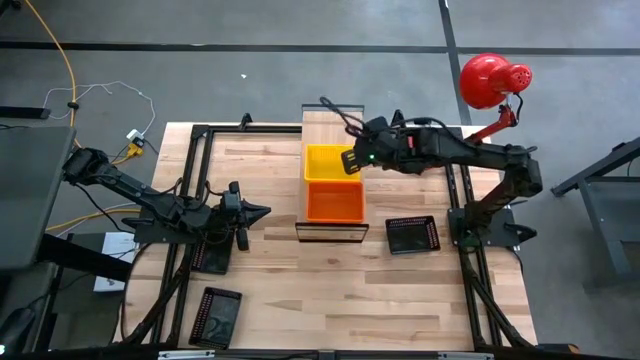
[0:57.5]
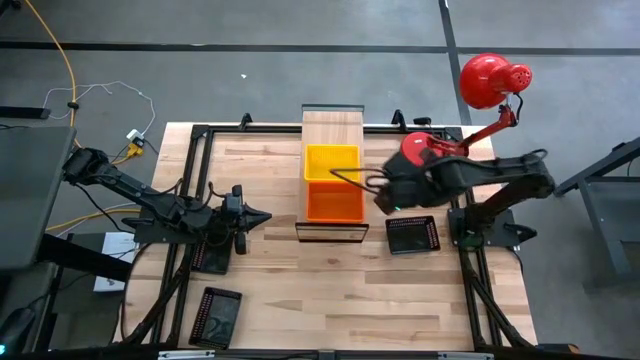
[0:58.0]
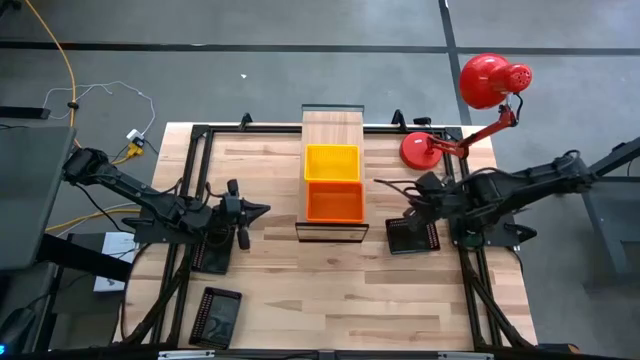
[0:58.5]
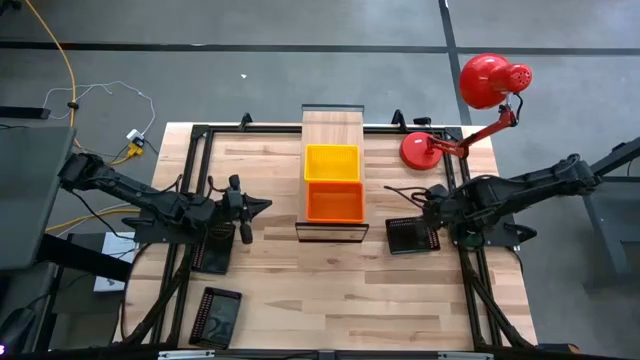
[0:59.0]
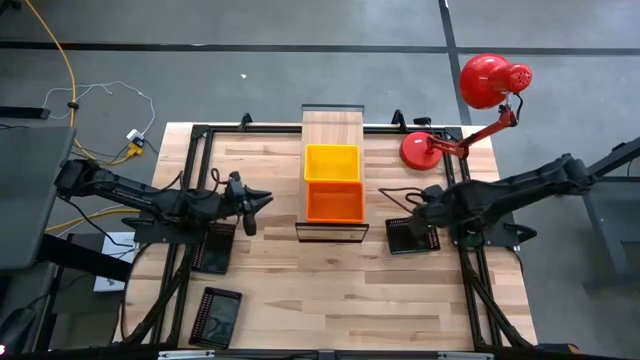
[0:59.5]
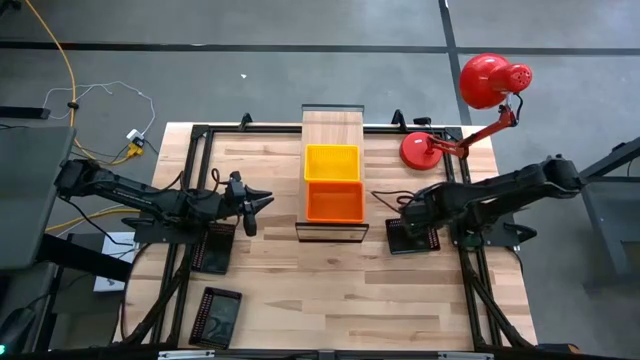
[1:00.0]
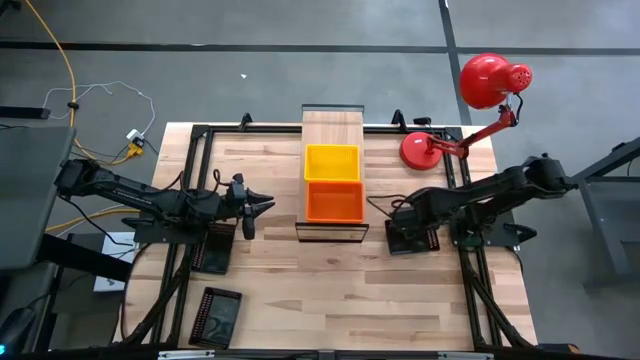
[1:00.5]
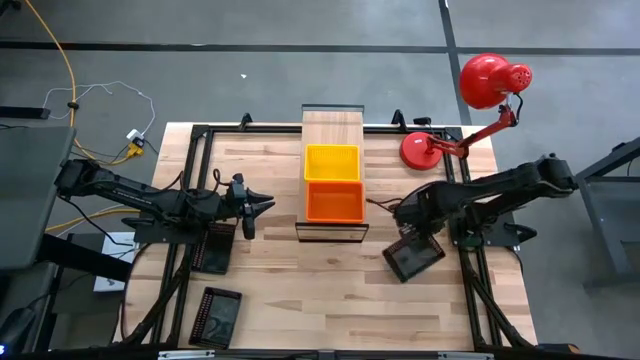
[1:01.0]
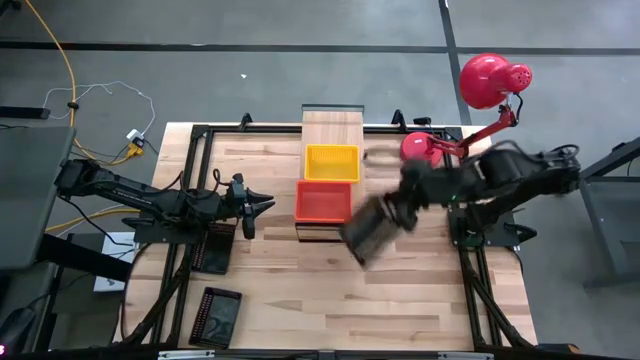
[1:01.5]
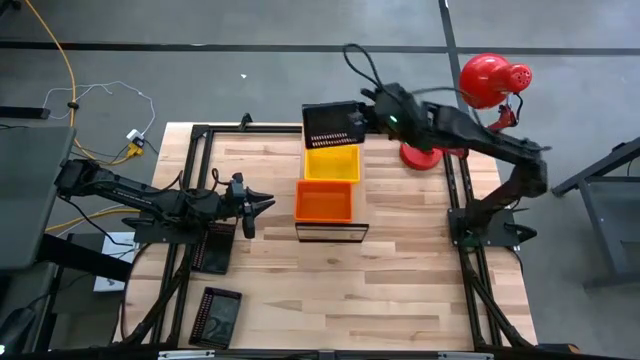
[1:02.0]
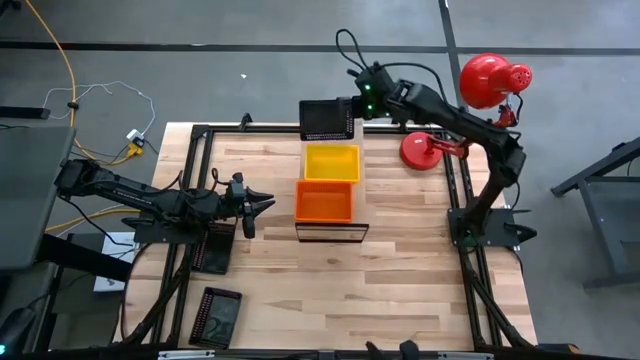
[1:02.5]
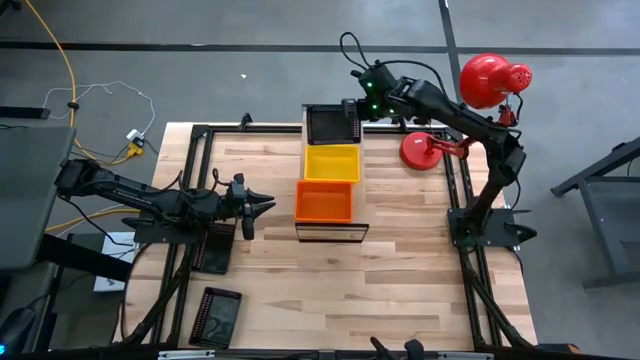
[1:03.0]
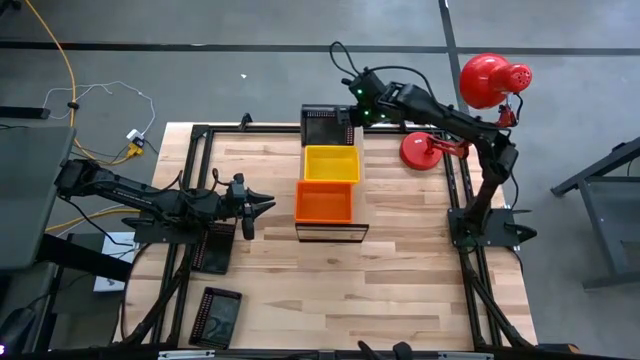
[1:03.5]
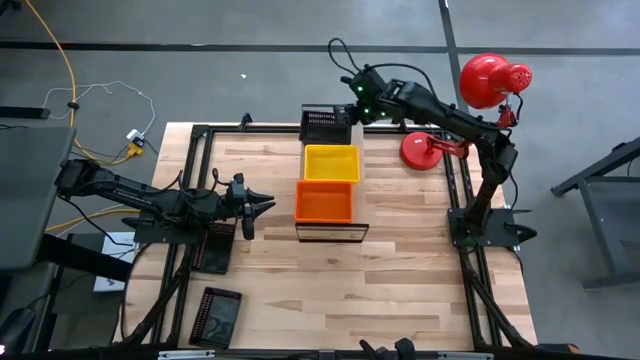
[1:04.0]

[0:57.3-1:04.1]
Task: Stack baskets on shelf by color
Put the top right black bin on the shelf

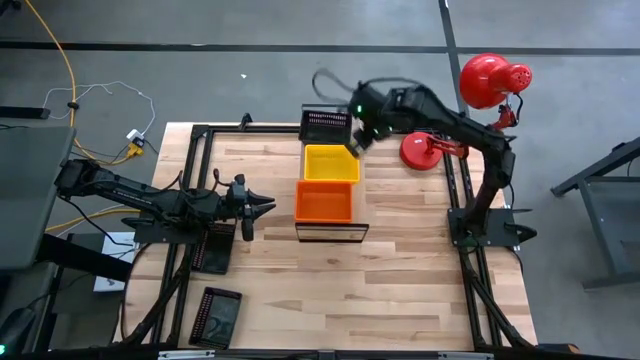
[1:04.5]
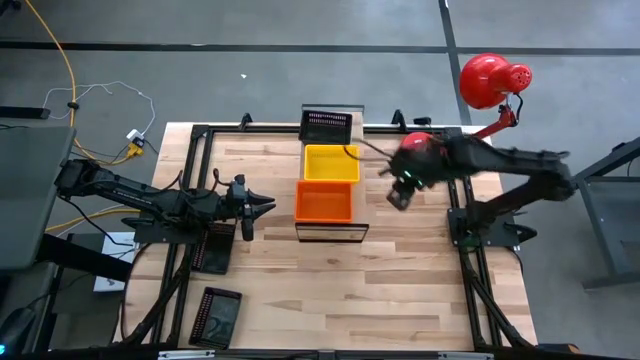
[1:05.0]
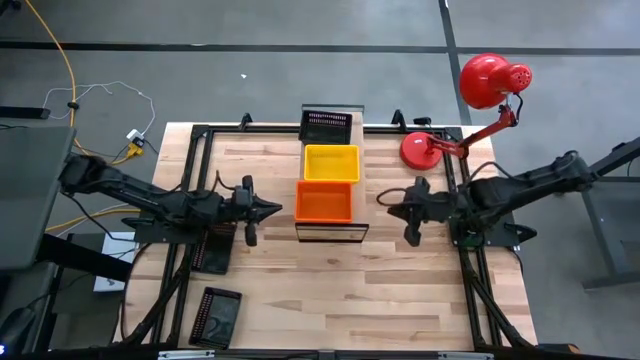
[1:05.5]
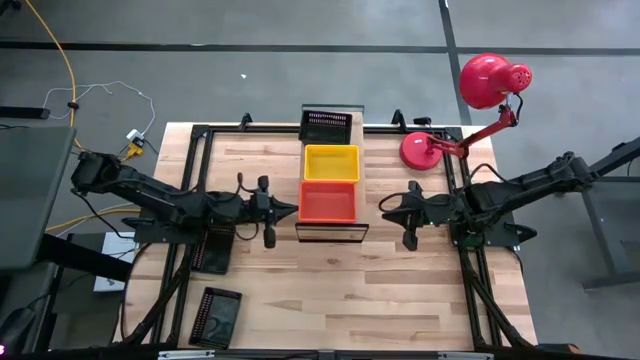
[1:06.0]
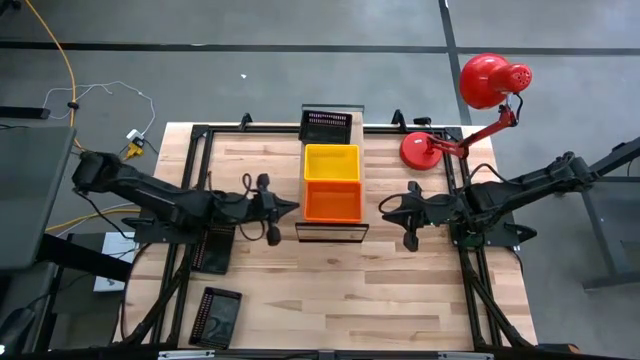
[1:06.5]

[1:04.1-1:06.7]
Adjust the stacked orange bins

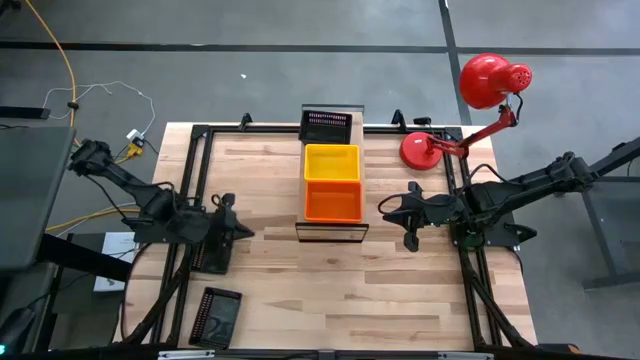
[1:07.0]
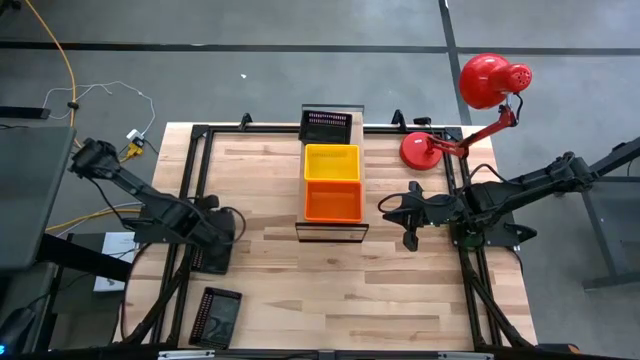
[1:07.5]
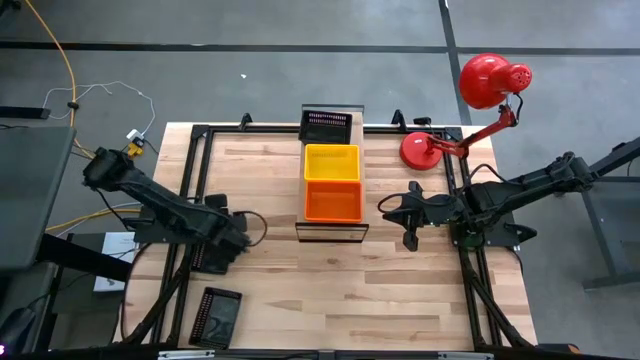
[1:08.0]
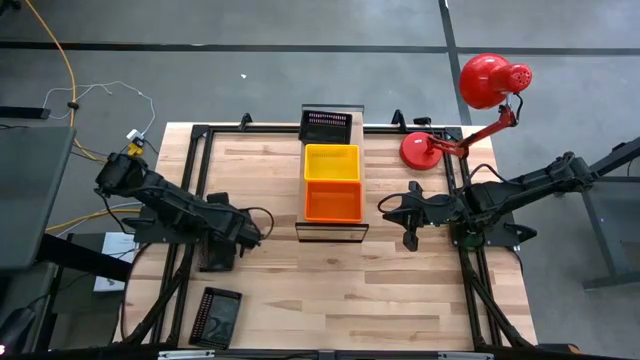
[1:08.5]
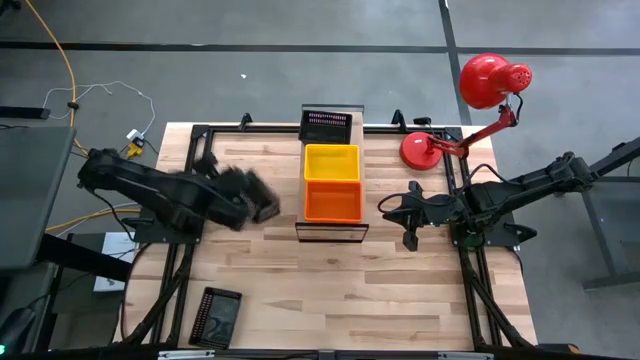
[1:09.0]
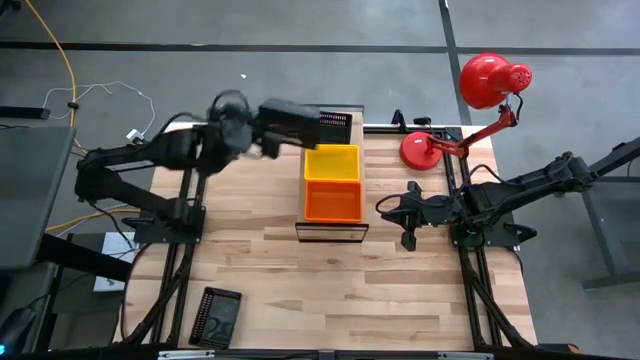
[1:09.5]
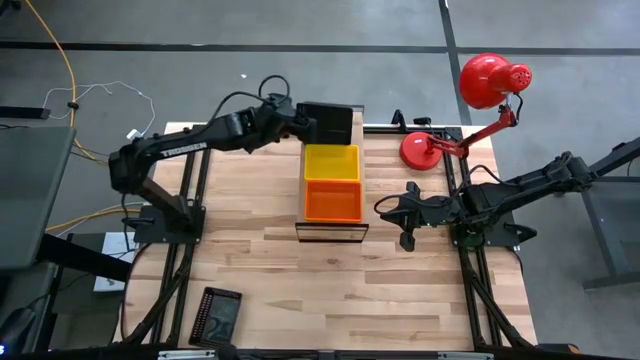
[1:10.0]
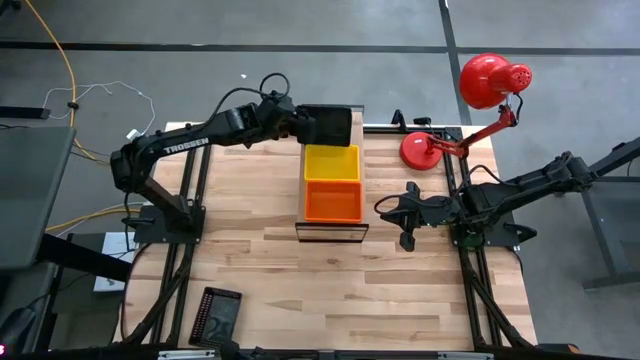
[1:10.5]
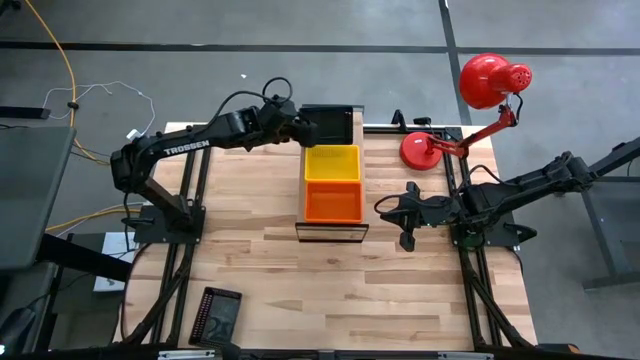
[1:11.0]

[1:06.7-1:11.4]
Stack the top black bin on the black bin on the shelf

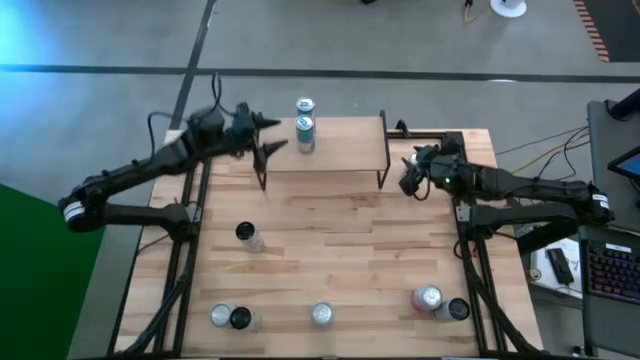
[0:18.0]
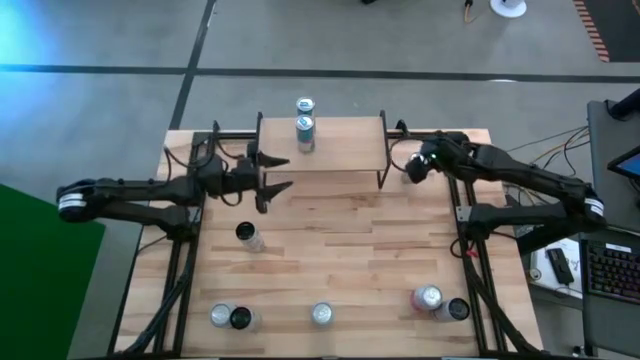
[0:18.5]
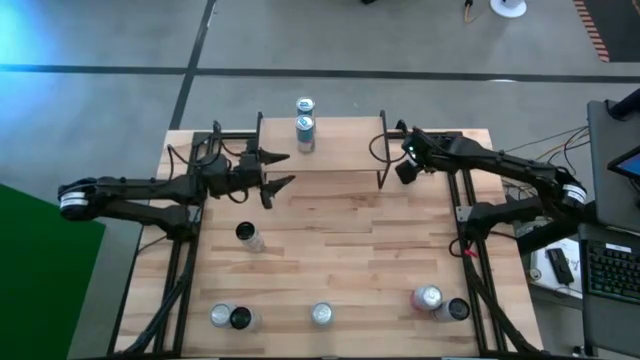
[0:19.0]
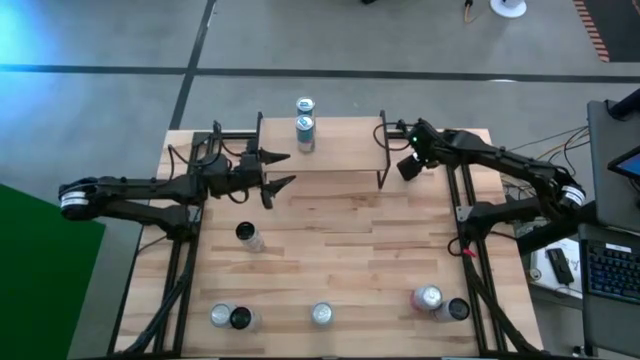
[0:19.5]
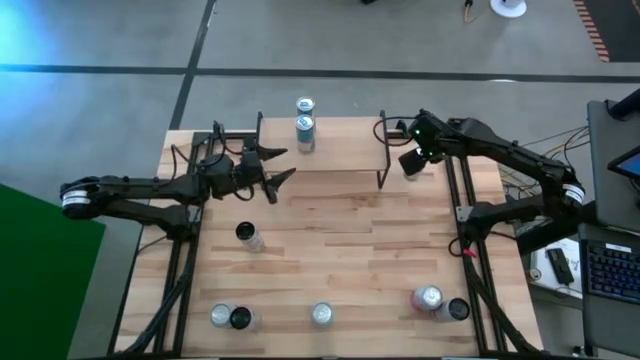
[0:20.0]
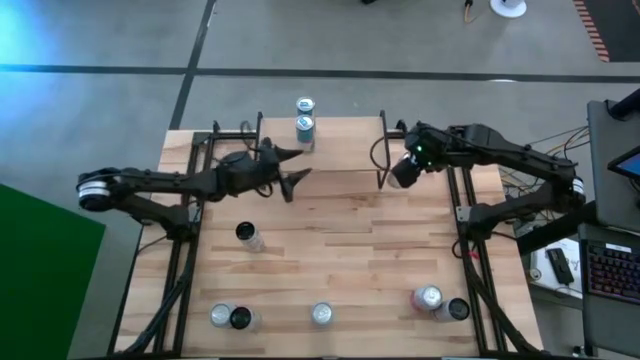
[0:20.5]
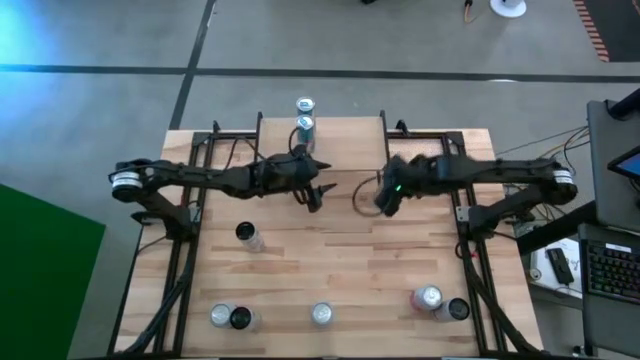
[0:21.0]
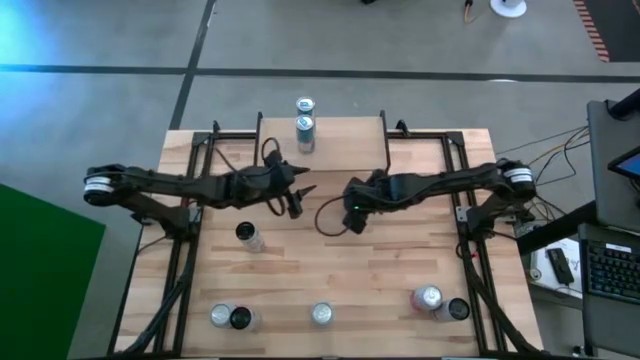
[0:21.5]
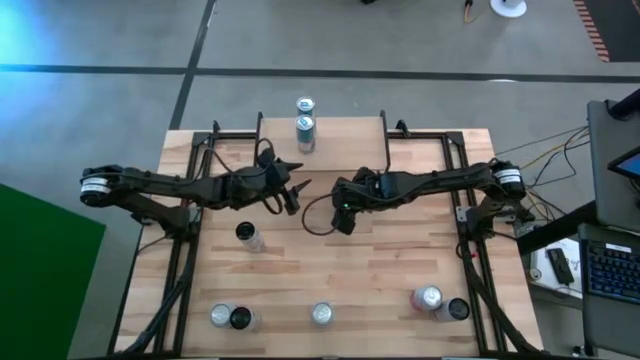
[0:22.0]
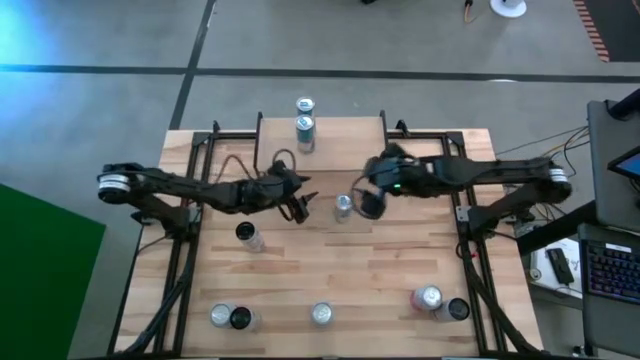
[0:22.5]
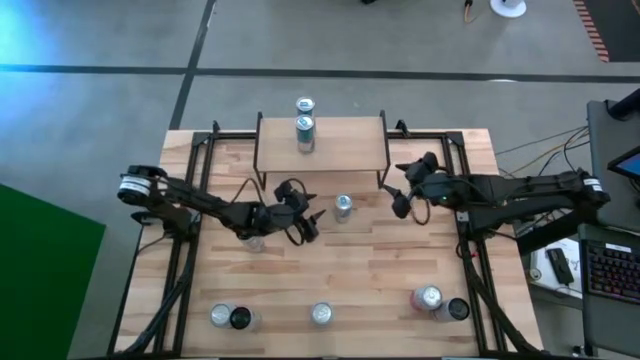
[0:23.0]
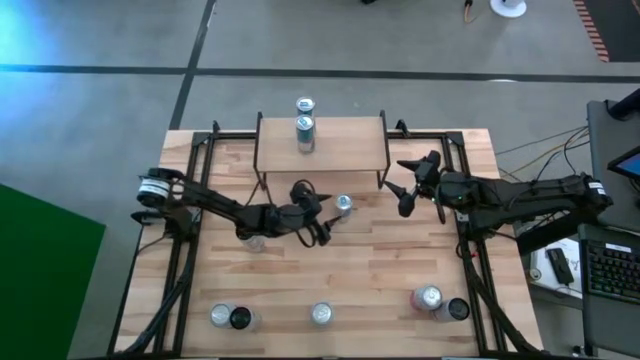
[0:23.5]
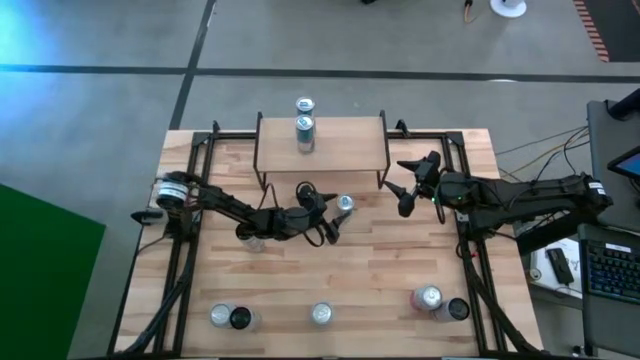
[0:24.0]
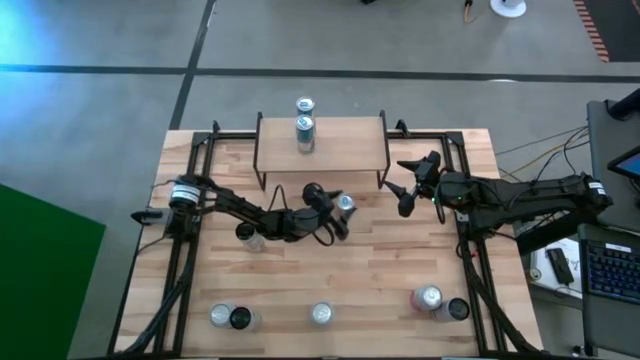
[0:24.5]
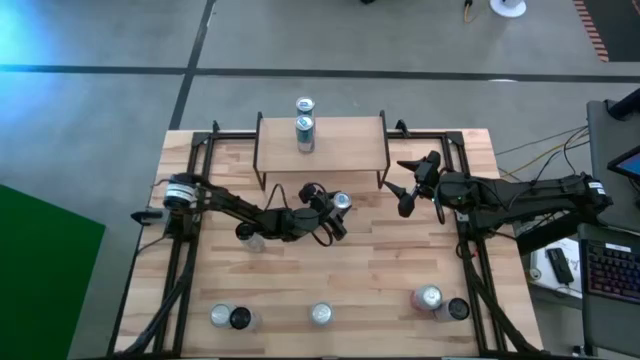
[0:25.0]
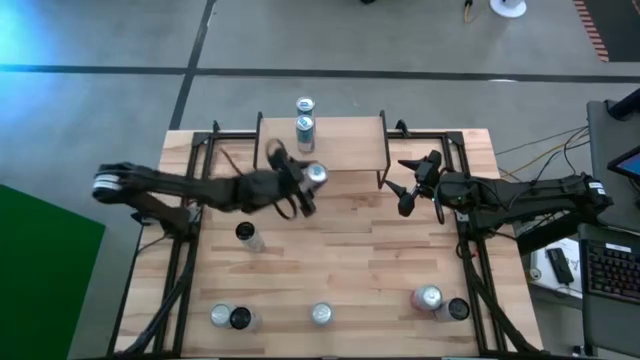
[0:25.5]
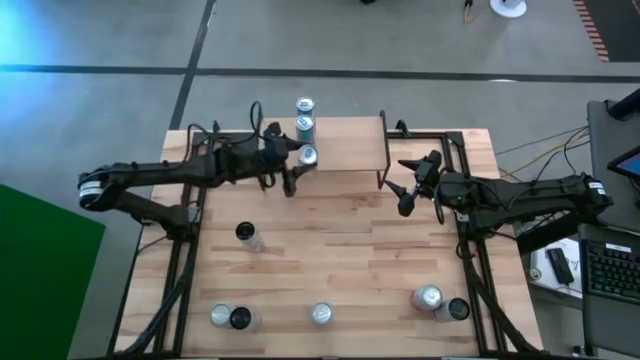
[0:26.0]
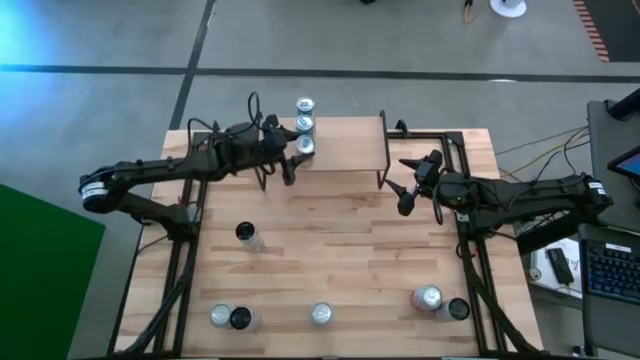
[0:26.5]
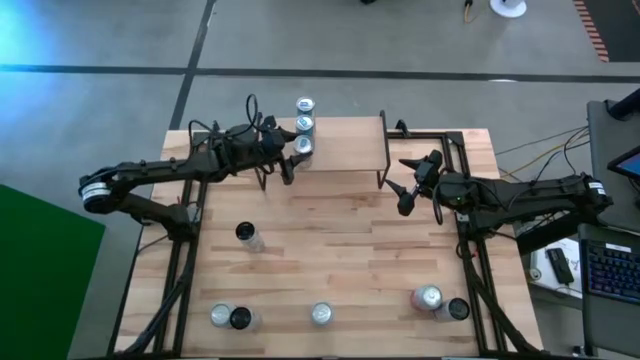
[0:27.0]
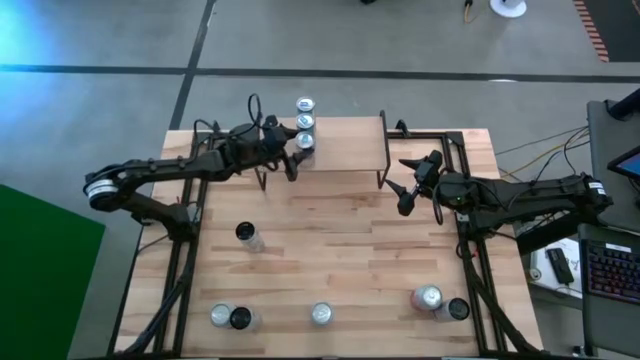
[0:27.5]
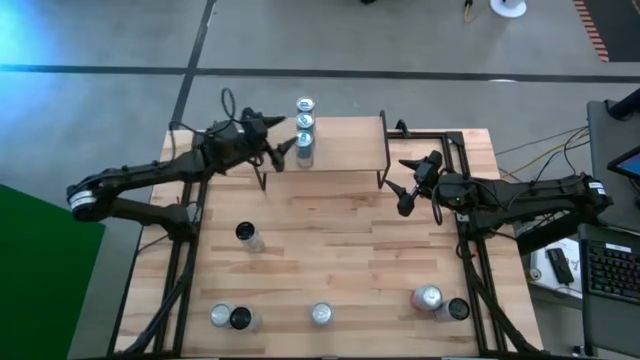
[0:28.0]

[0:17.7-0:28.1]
Task: Place canned beverage on shelf
Align the blue soda can with the other blue soda can on the shelf
